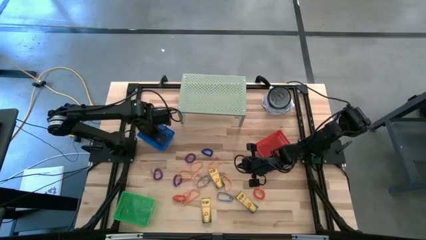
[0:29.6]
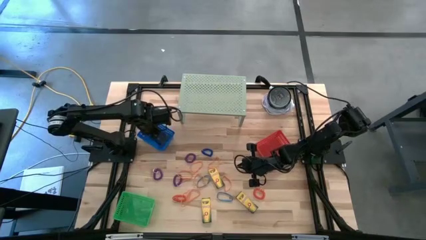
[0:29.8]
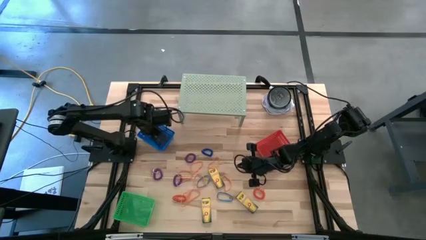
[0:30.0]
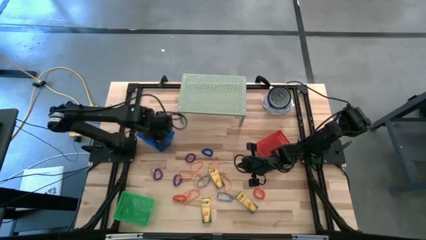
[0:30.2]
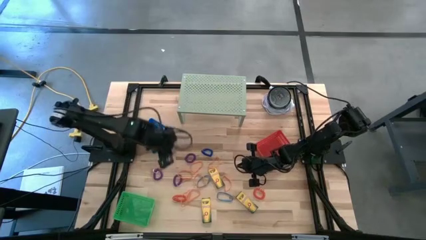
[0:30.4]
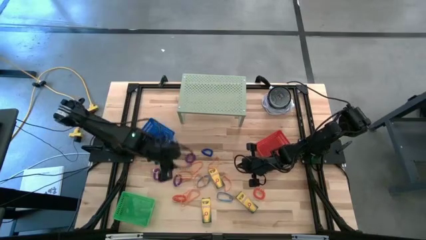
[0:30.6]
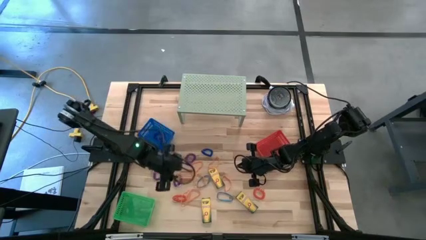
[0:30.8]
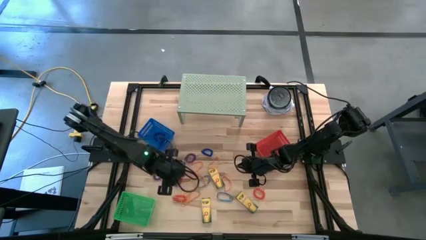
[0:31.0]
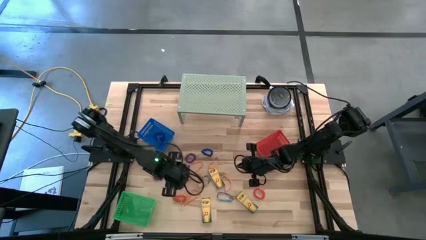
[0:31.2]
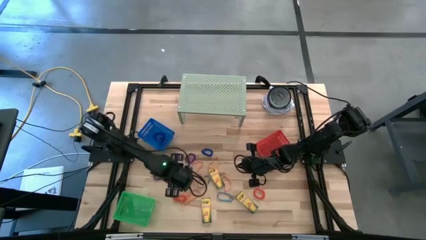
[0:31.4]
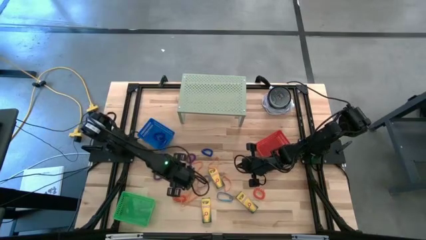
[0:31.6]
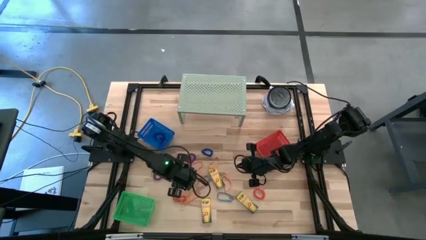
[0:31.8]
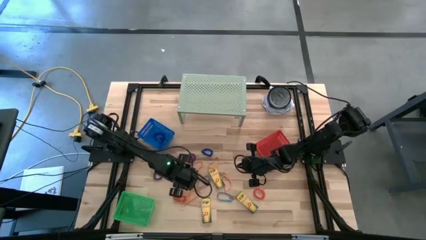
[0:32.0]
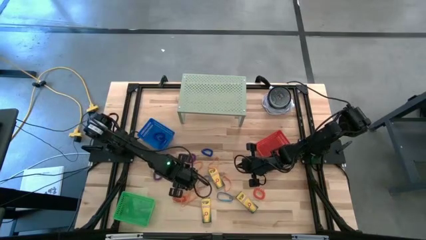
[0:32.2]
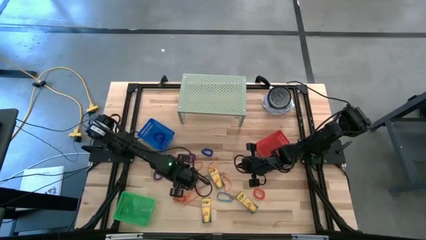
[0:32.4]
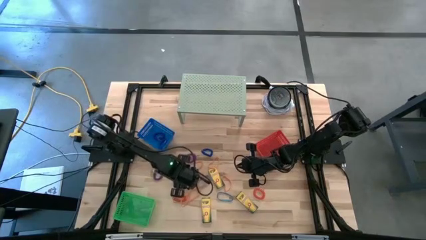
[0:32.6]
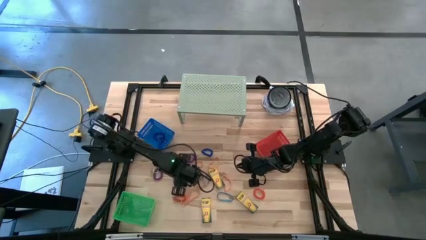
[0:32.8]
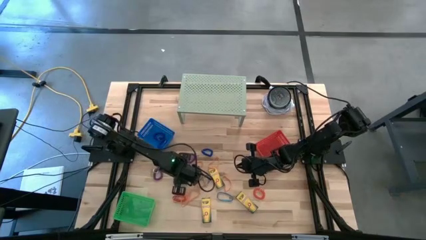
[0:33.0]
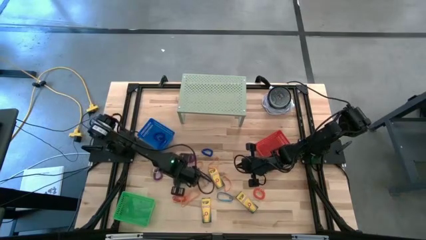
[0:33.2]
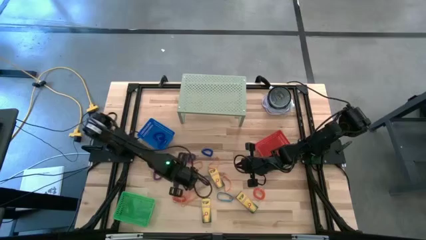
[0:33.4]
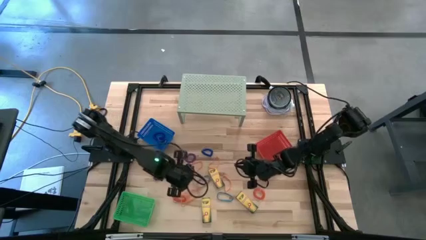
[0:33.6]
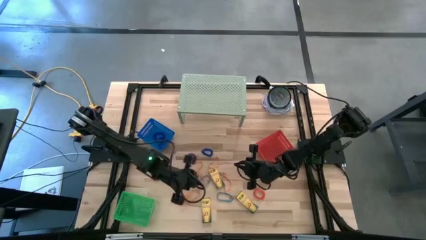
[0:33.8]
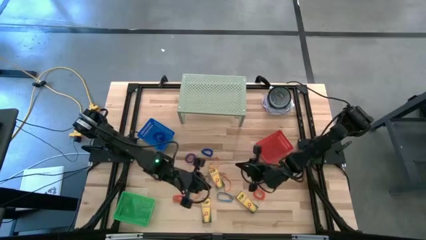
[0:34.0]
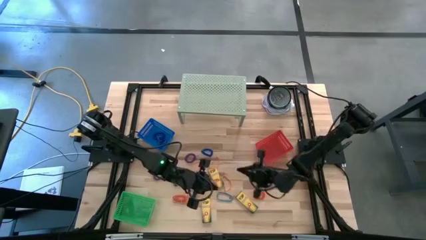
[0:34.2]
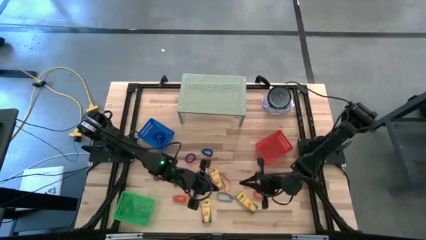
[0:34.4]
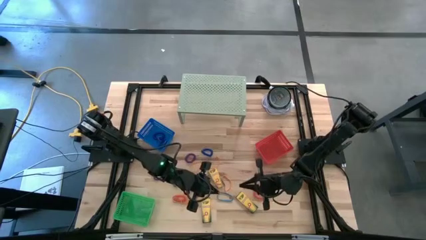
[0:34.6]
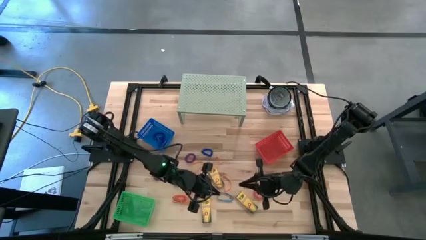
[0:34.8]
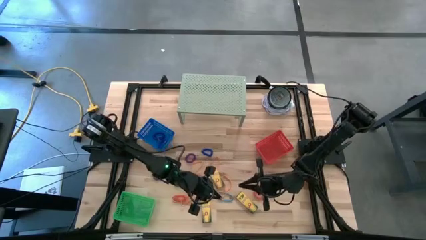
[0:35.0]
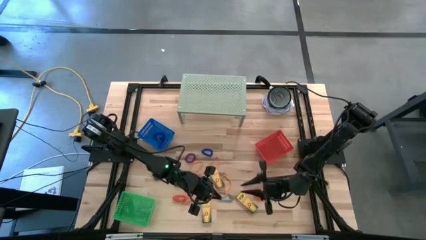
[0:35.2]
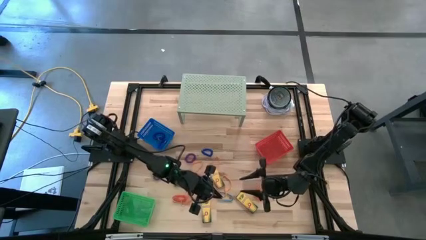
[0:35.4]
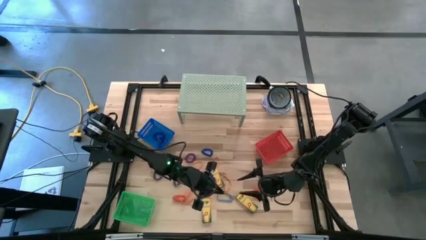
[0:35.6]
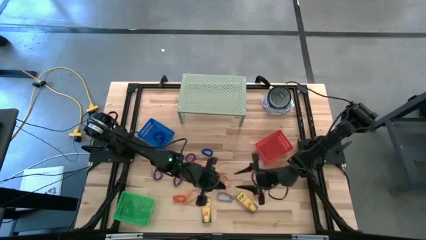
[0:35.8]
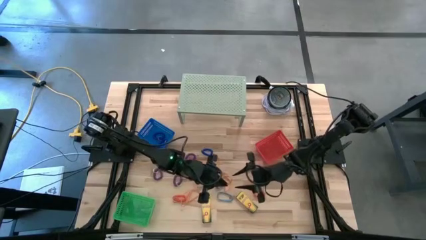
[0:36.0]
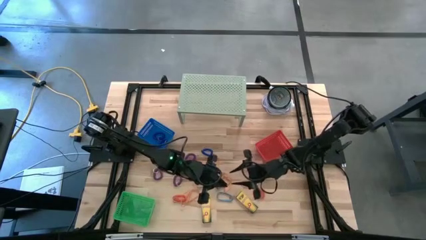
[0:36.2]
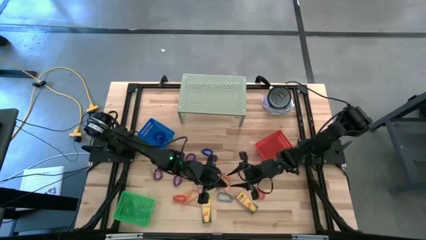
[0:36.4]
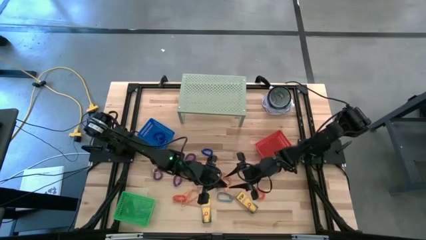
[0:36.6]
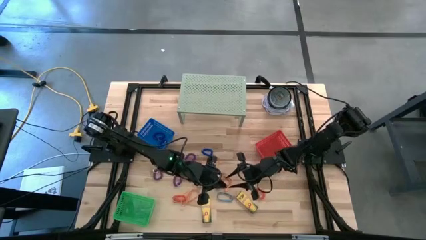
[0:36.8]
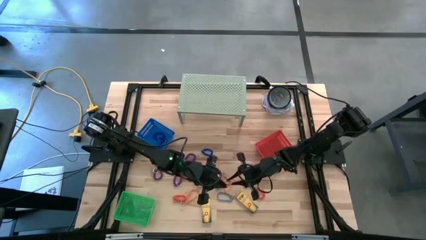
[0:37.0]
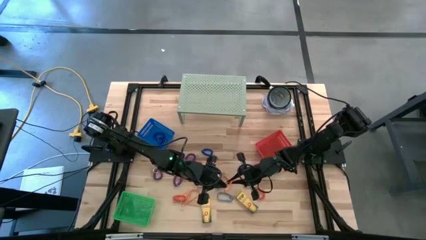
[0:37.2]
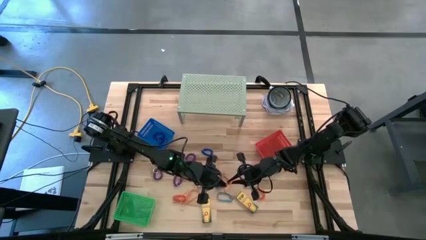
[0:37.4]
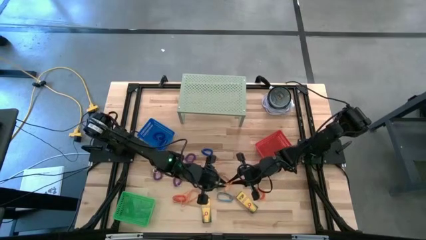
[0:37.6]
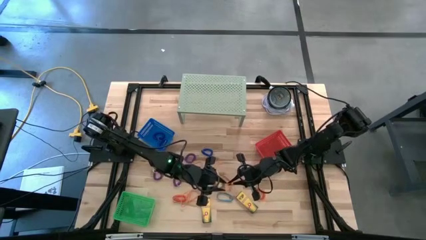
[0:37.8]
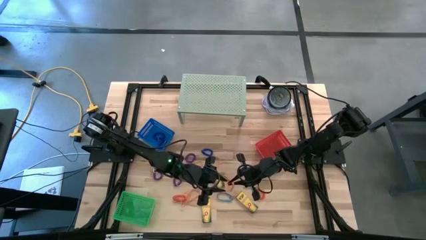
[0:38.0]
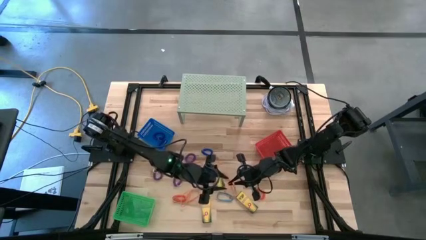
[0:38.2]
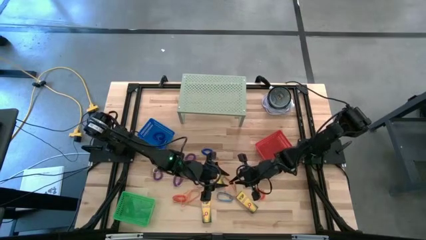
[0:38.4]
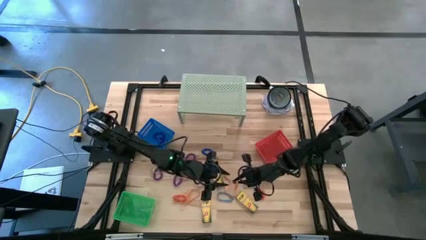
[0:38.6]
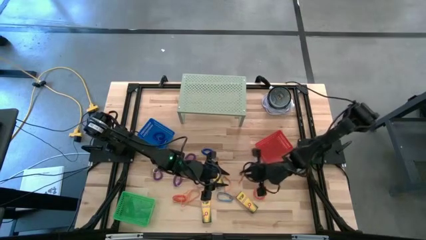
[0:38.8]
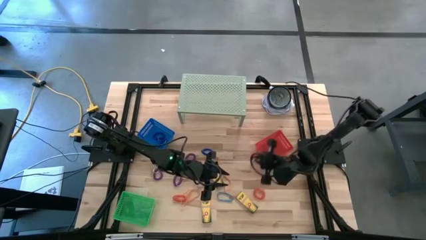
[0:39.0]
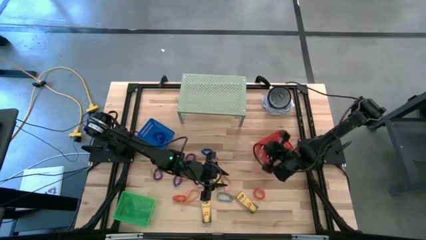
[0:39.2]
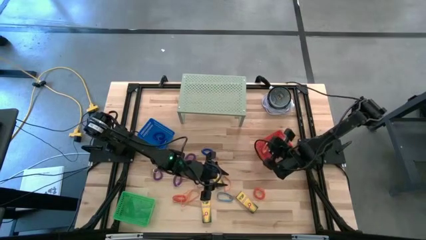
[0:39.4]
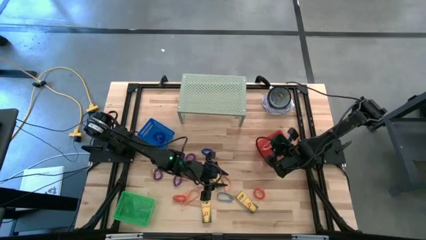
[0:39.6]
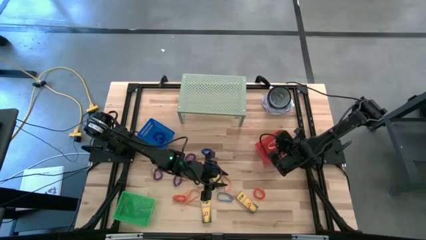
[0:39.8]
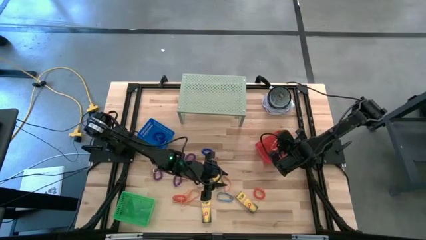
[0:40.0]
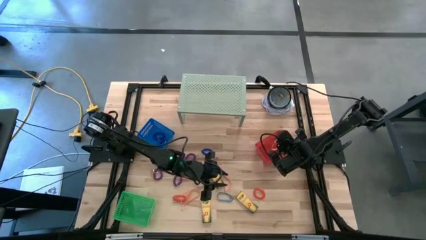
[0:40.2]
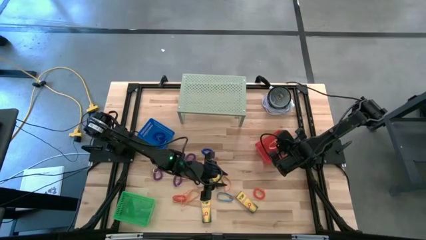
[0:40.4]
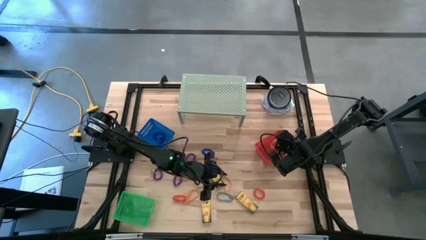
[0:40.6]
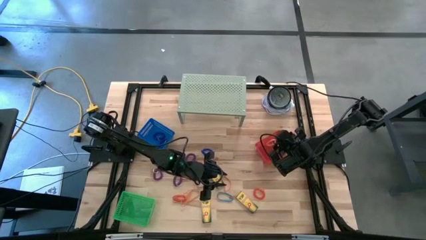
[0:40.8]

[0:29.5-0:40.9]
Task: Pick & Place Office Desk Supplies
Put the orange rubberband into the red bin

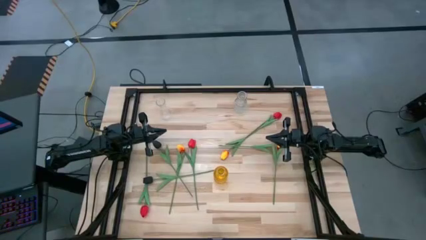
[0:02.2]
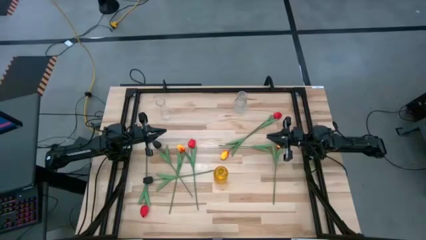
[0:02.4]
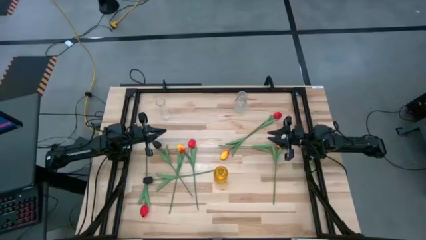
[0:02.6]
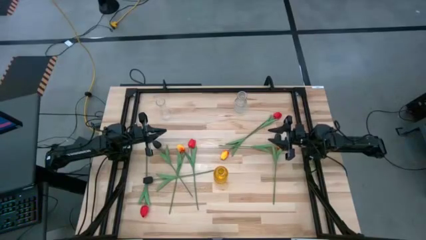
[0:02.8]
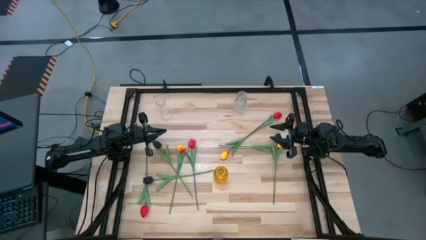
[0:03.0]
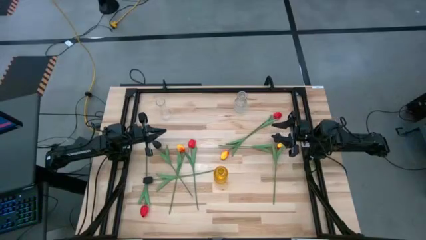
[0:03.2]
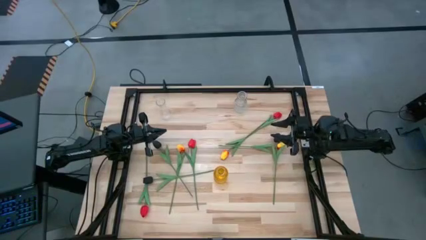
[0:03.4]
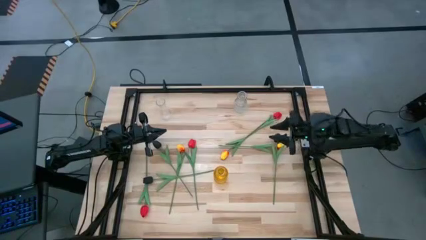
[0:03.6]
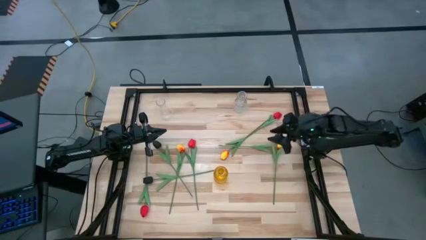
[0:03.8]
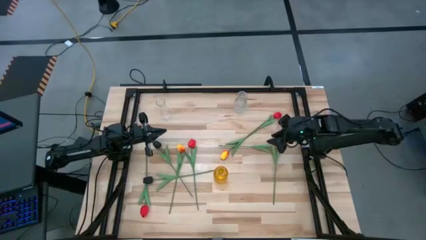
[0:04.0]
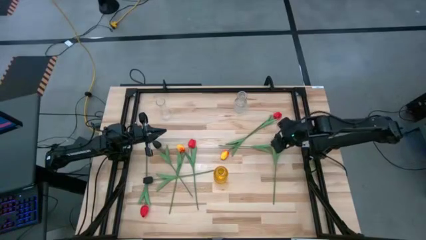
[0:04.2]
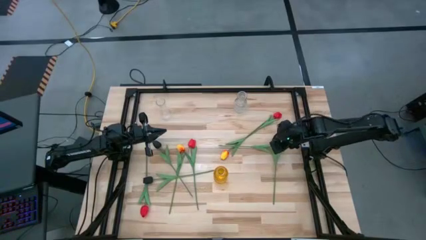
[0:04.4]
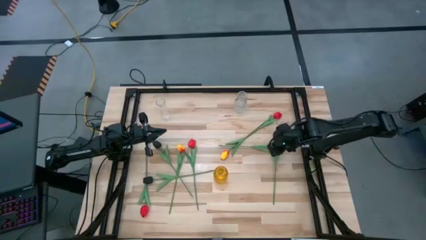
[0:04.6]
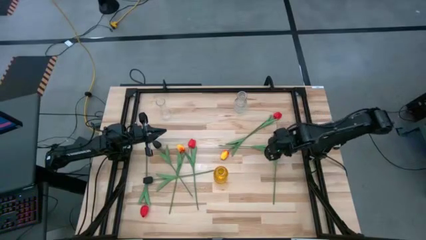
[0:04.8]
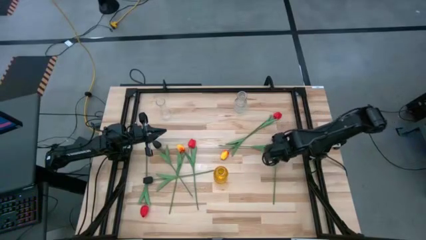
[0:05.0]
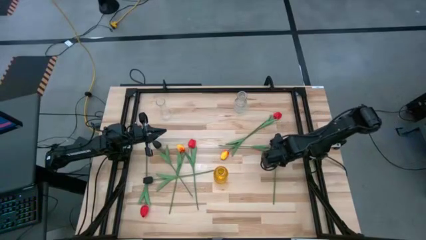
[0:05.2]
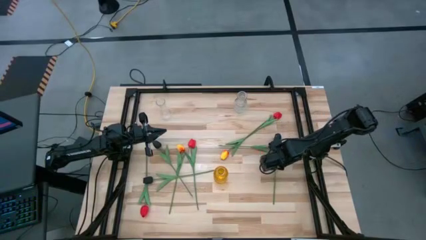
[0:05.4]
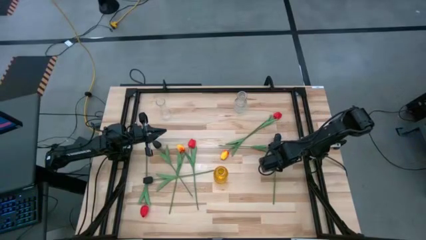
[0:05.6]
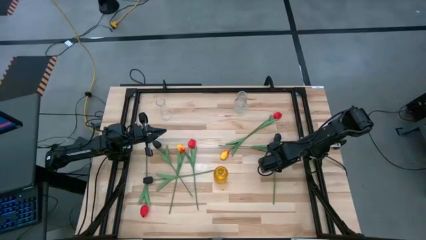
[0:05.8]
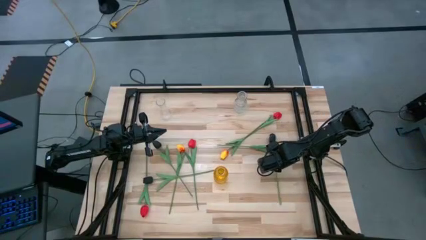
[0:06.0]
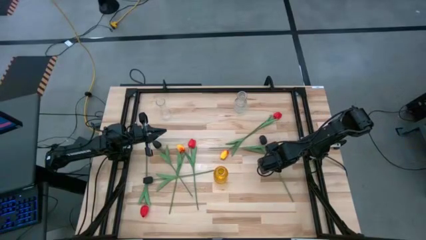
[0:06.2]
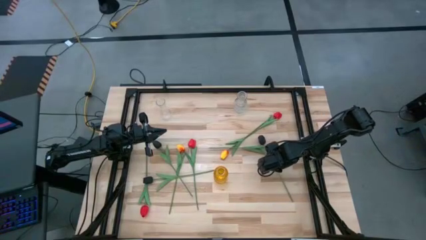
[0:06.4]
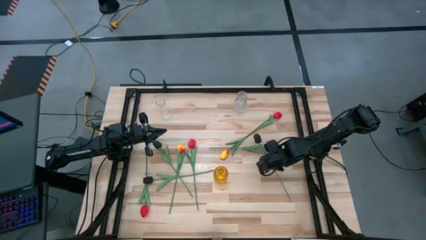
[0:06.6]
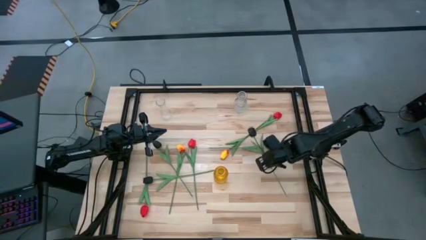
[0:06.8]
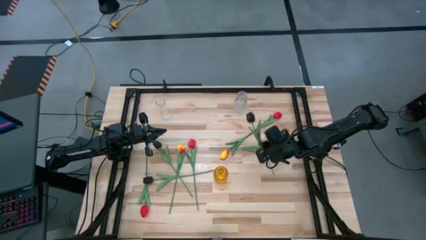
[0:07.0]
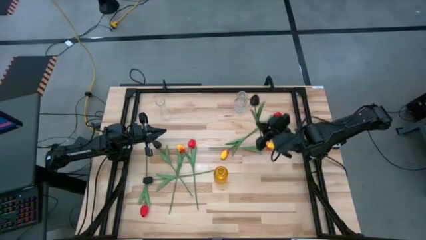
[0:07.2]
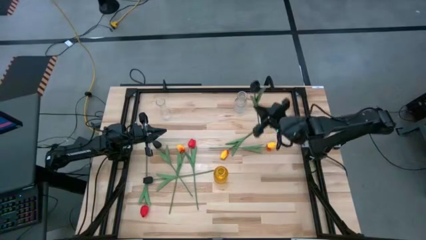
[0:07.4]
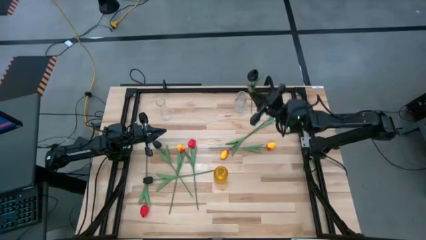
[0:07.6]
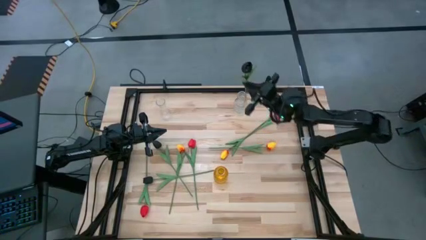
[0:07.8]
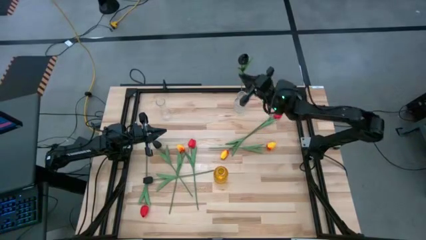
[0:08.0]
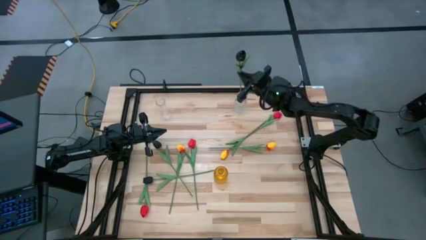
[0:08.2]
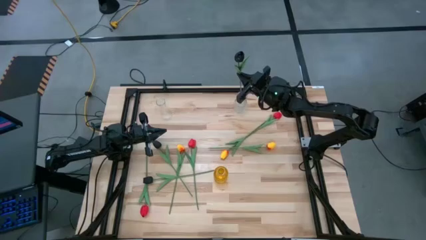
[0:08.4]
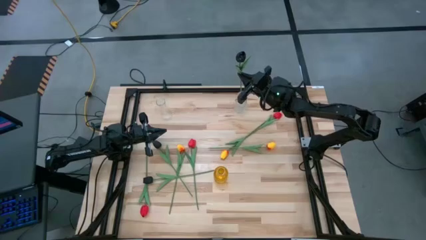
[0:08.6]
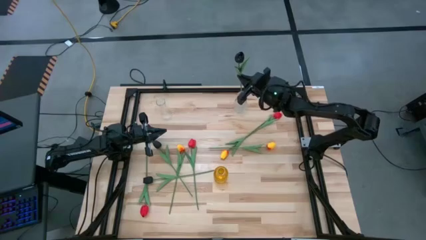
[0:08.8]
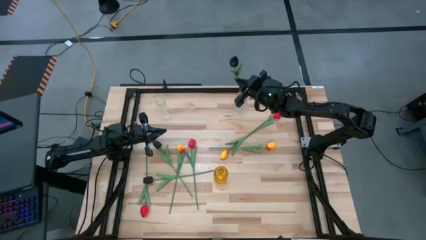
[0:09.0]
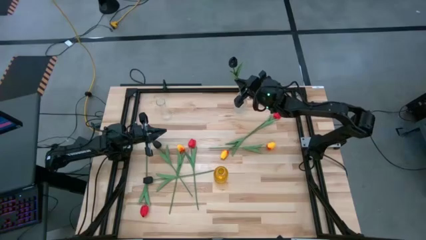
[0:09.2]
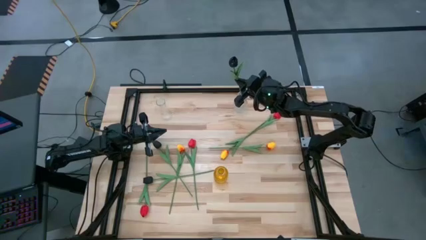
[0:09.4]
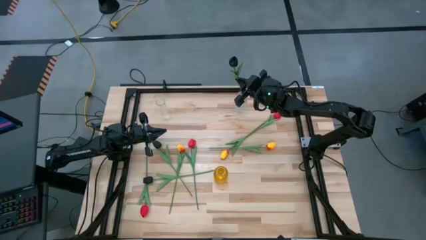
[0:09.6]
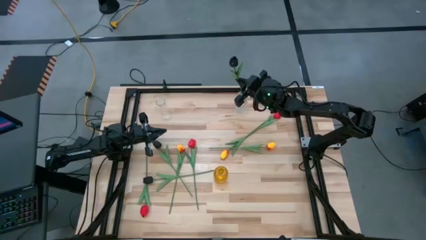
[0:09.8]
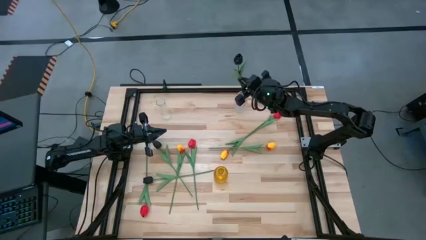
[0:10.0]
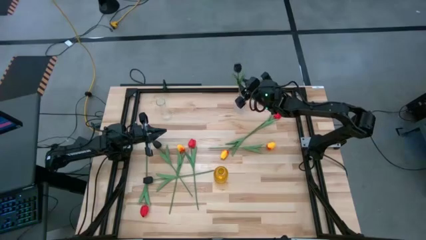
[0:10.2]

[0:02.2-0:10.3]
Task: Sort flowers into vase by color
Put the top right black flower into the right transparent vase
